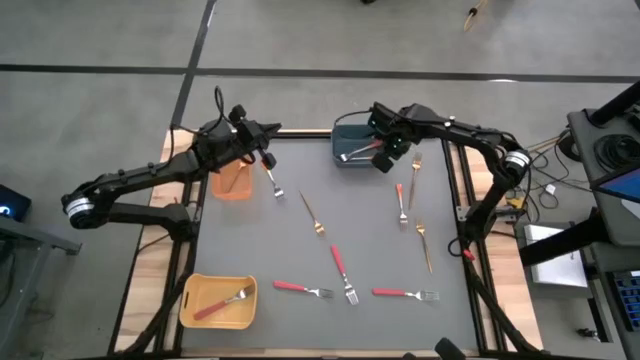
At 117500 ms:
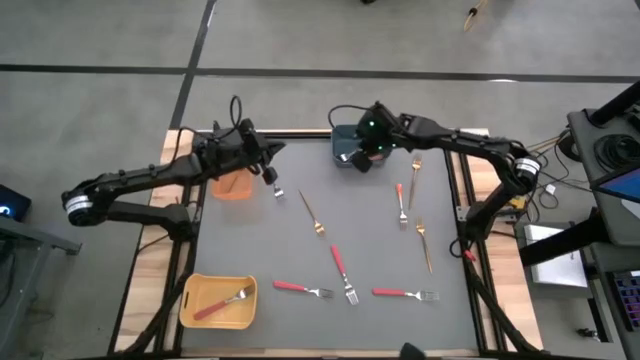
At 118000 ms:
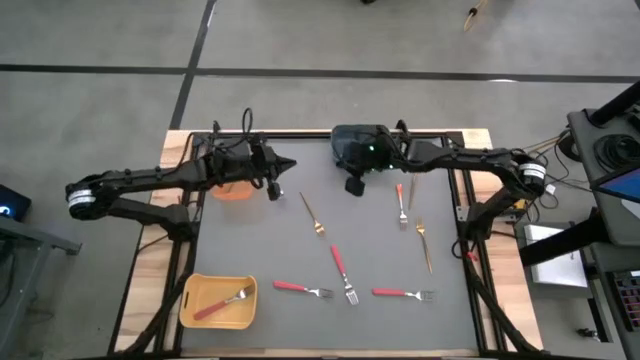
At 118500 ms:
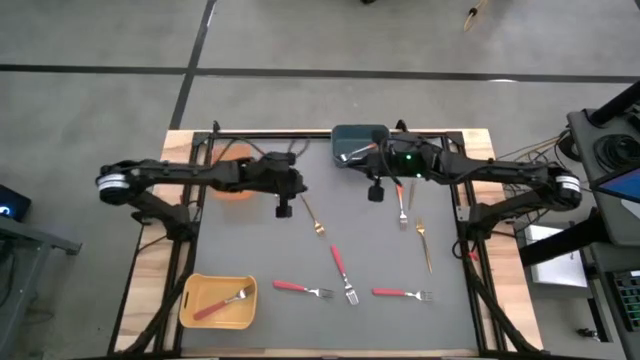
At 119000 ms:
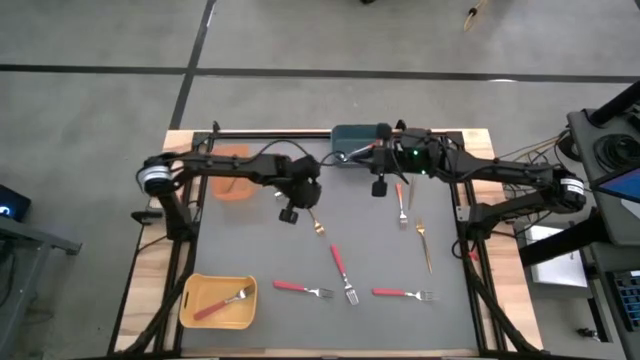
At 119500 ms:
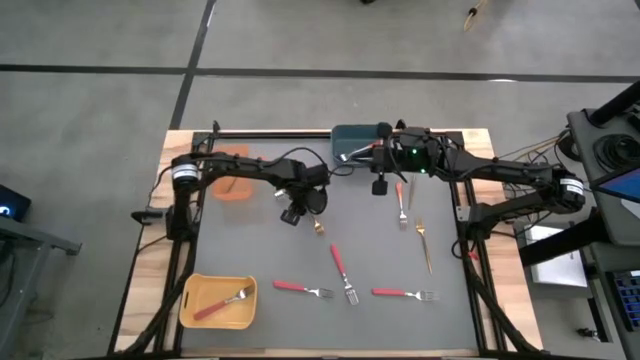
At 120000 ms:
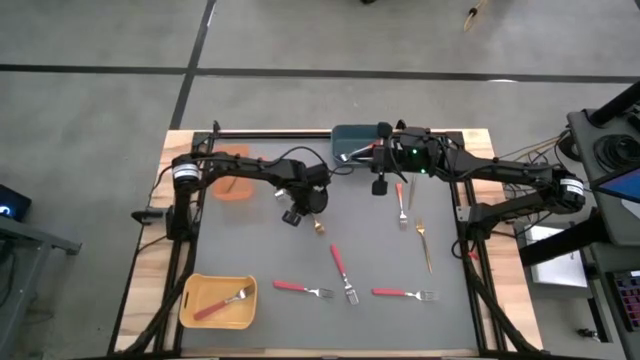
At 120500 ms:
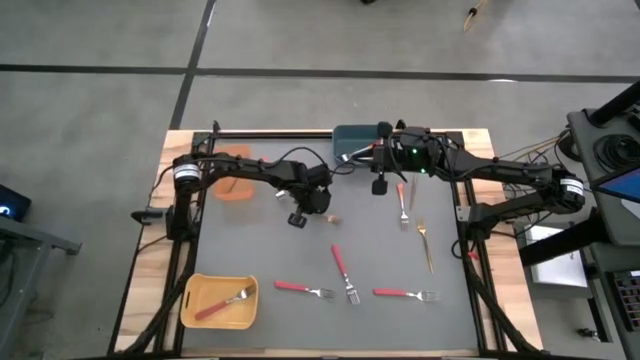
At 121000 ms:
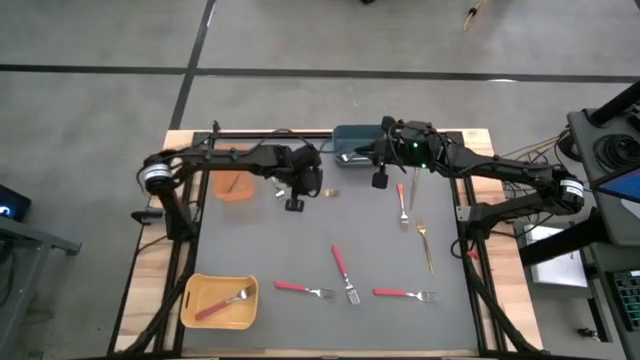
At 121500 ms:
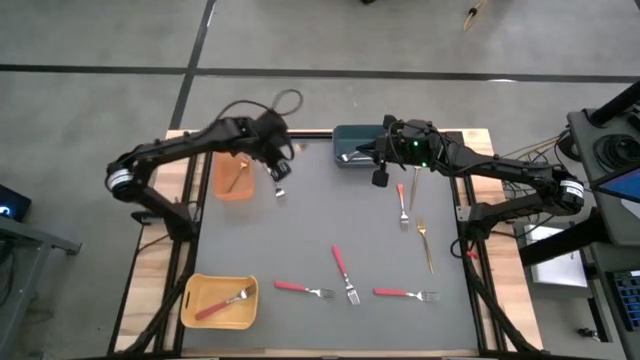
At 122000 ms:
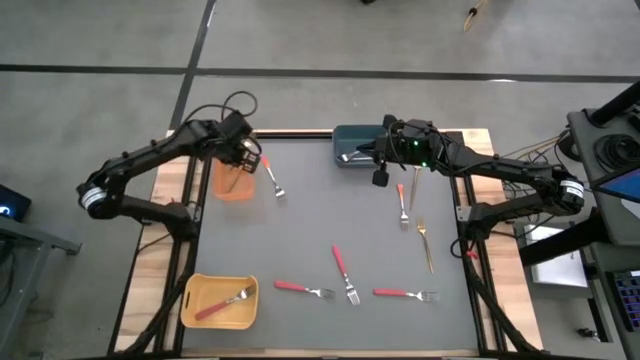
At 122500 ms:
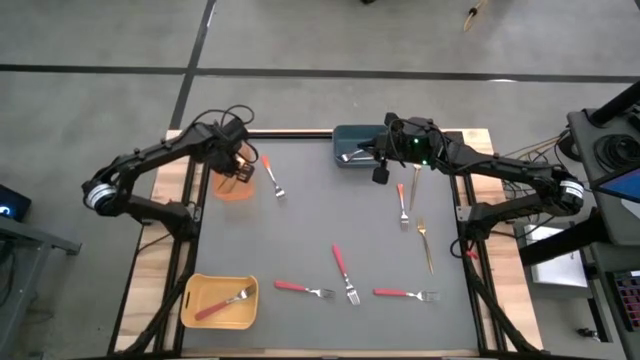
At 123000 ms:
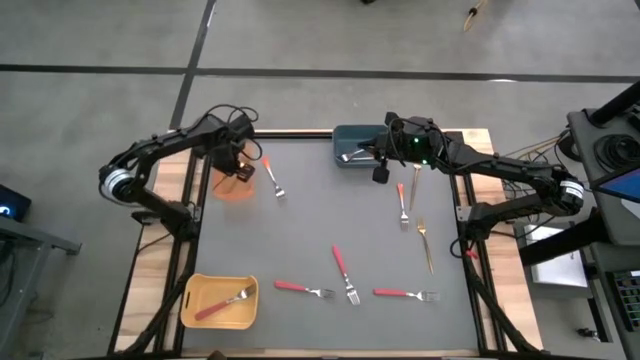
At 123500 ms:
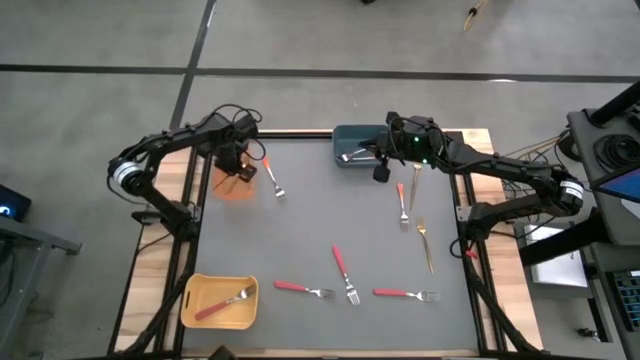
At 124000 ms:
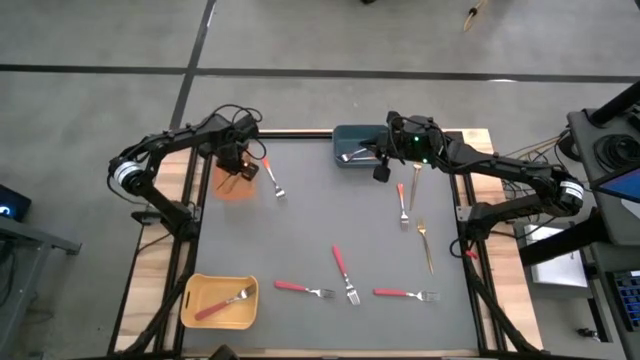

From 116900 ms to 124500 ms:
Task: Sort silverware by color (type)
Put the gold fork into the orange bin

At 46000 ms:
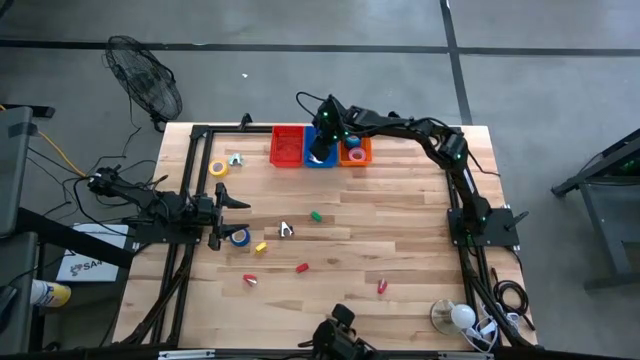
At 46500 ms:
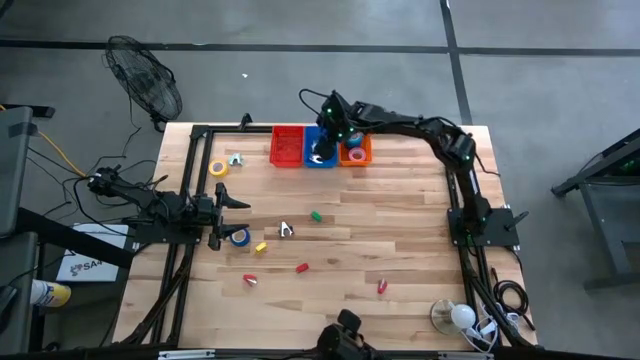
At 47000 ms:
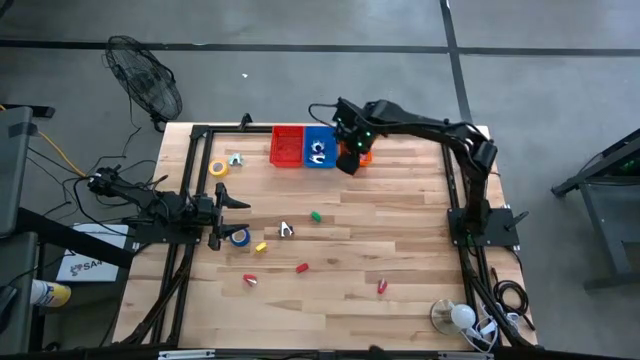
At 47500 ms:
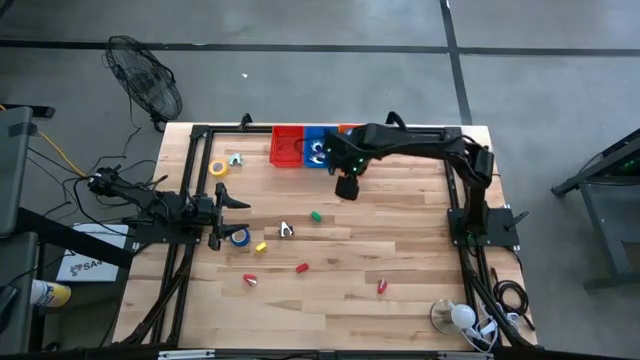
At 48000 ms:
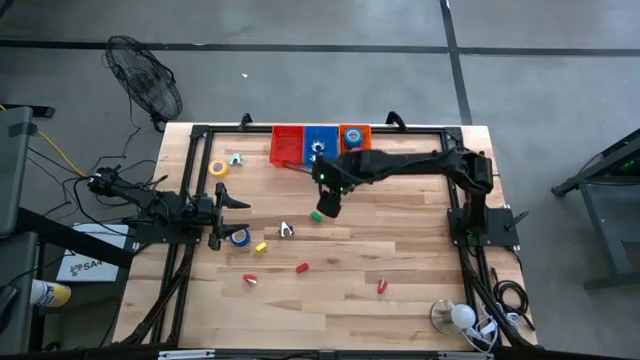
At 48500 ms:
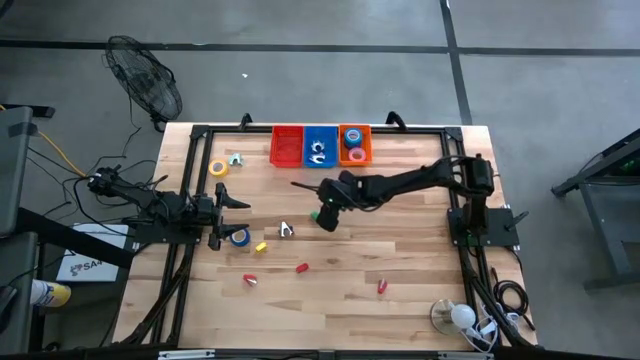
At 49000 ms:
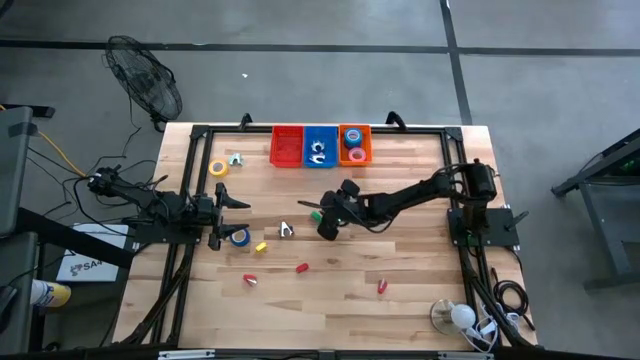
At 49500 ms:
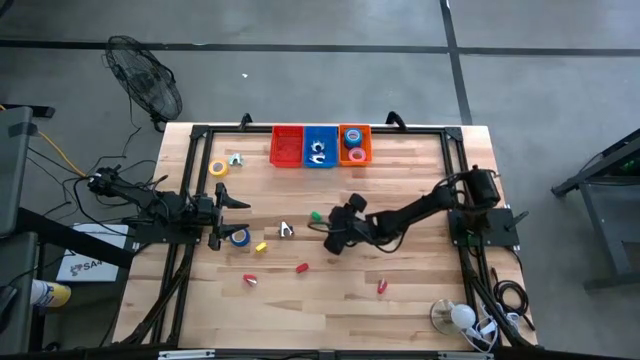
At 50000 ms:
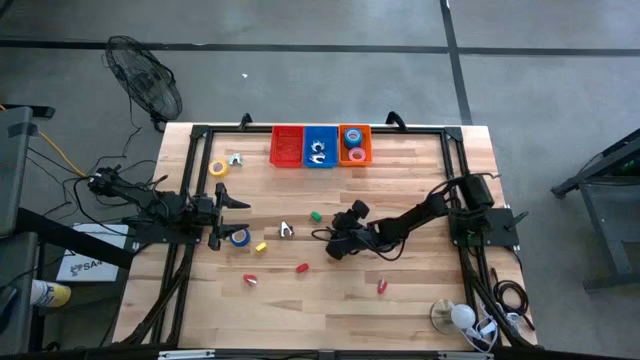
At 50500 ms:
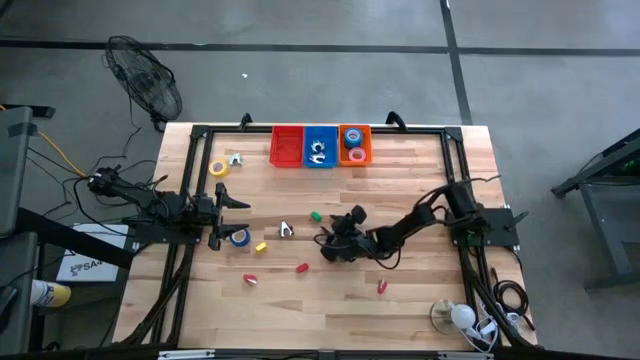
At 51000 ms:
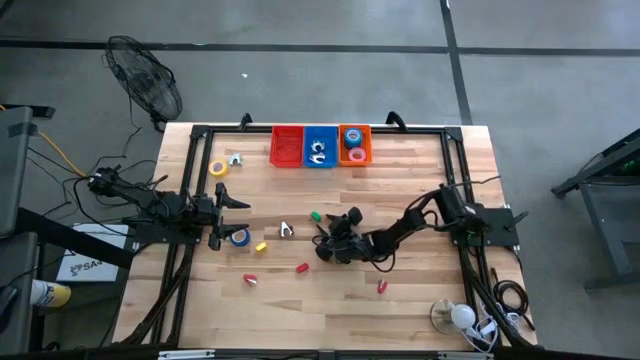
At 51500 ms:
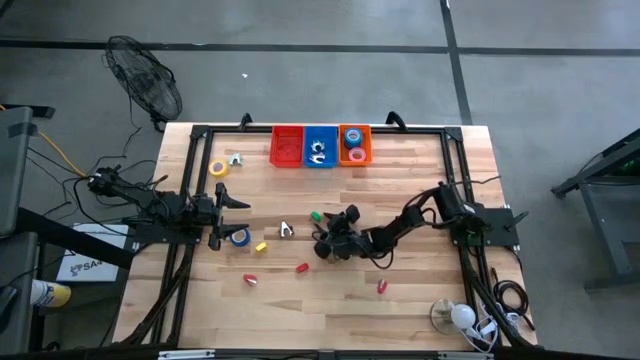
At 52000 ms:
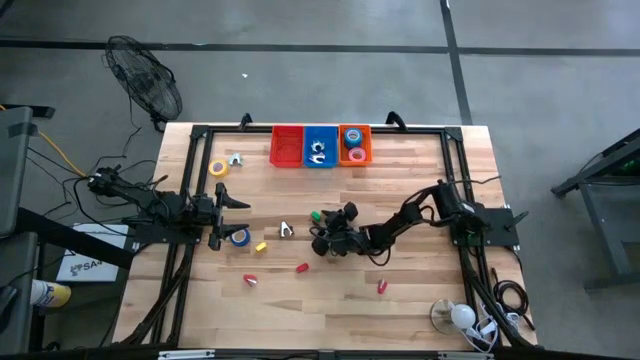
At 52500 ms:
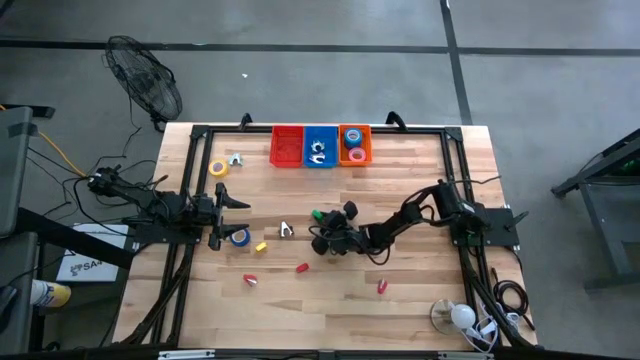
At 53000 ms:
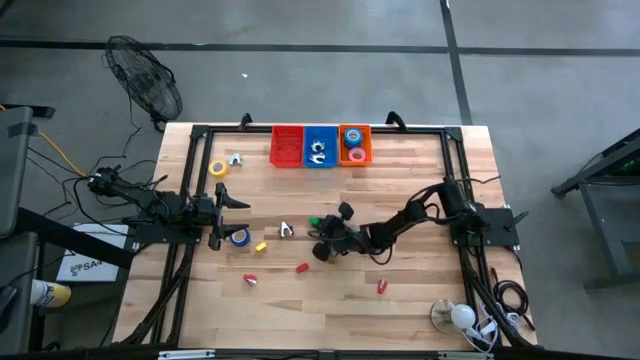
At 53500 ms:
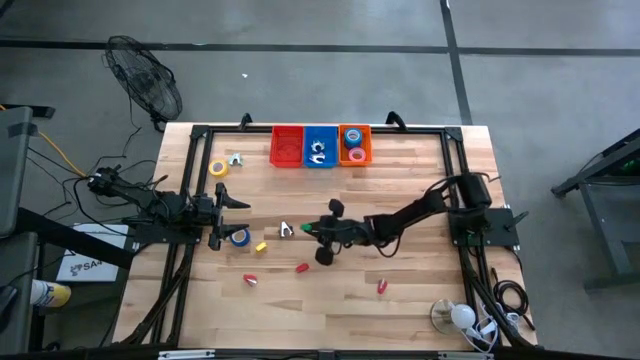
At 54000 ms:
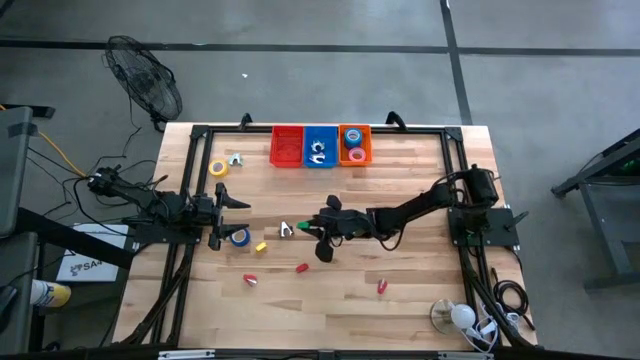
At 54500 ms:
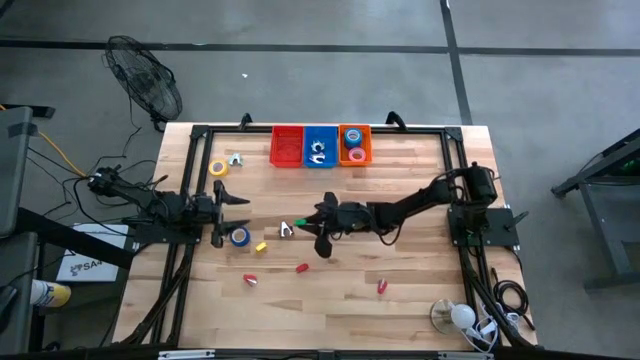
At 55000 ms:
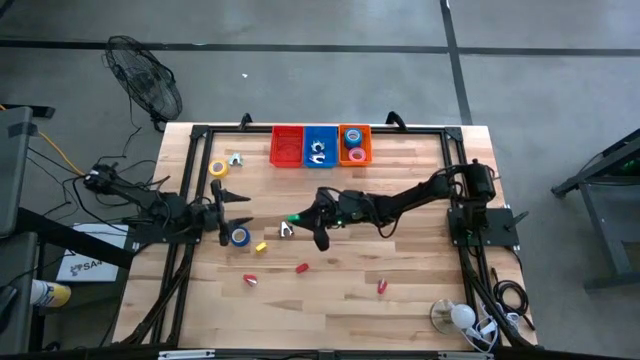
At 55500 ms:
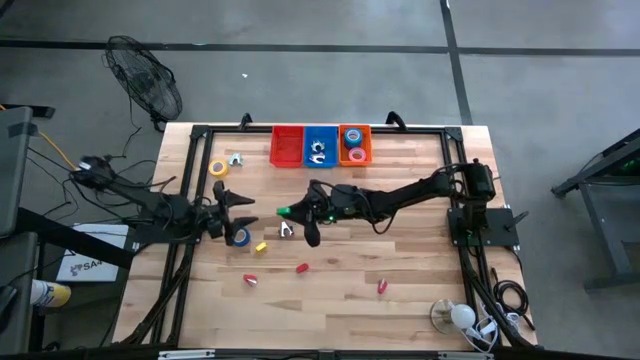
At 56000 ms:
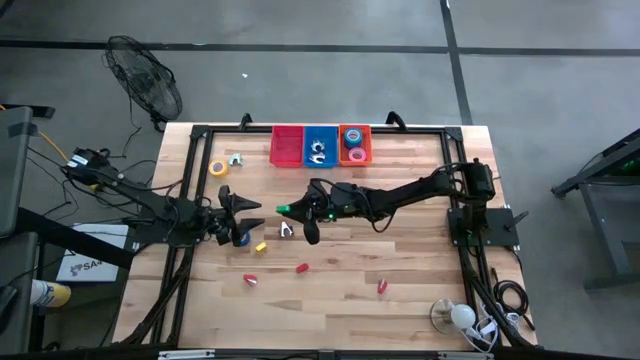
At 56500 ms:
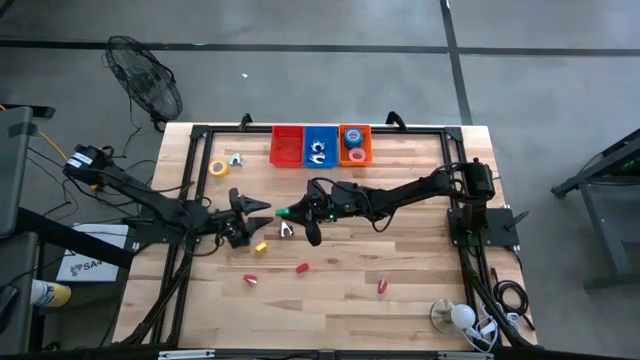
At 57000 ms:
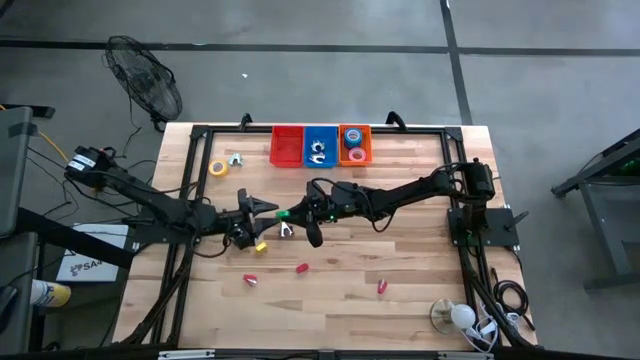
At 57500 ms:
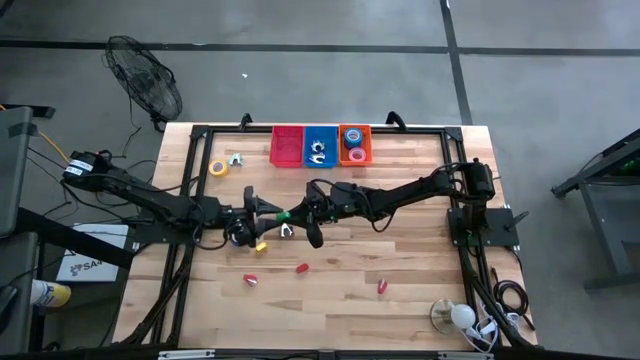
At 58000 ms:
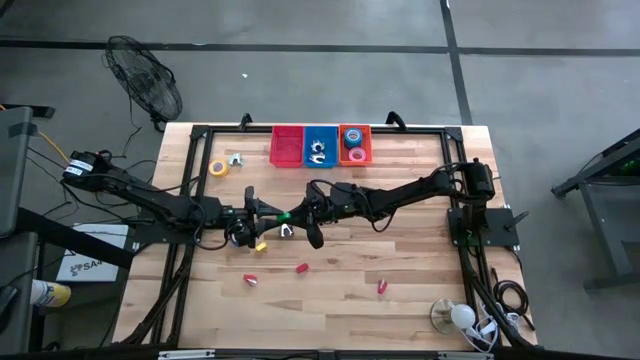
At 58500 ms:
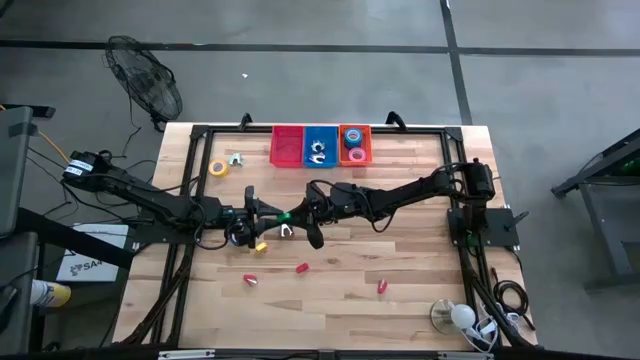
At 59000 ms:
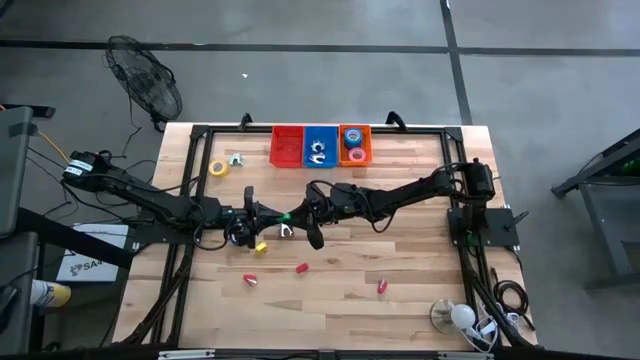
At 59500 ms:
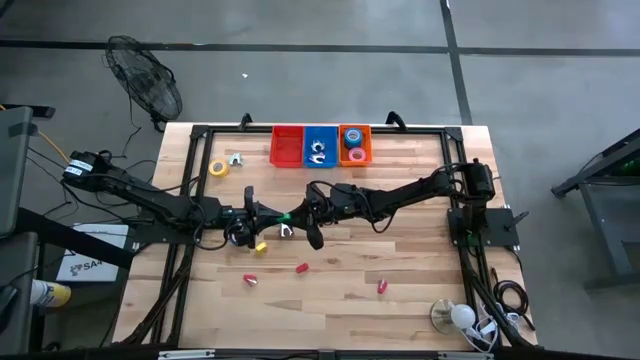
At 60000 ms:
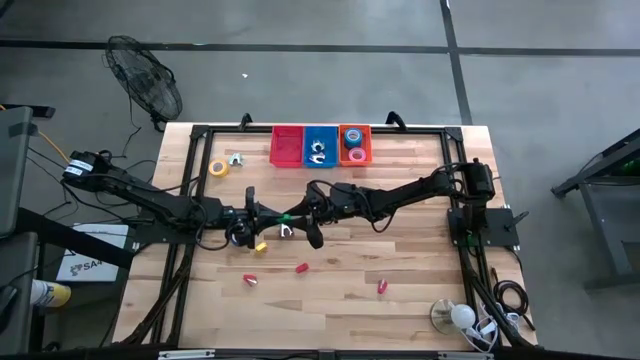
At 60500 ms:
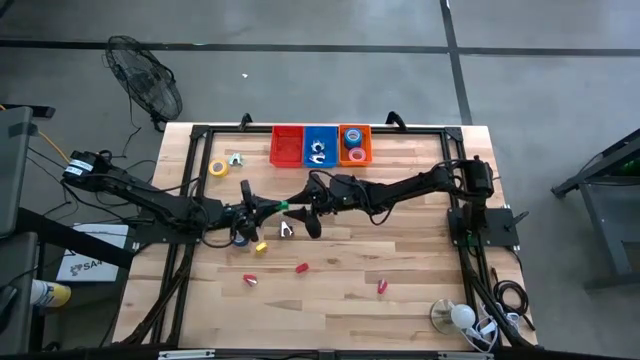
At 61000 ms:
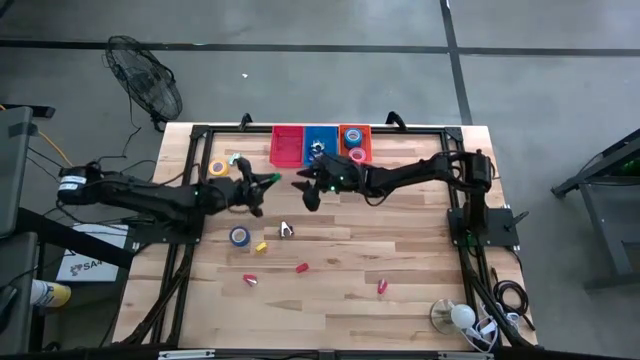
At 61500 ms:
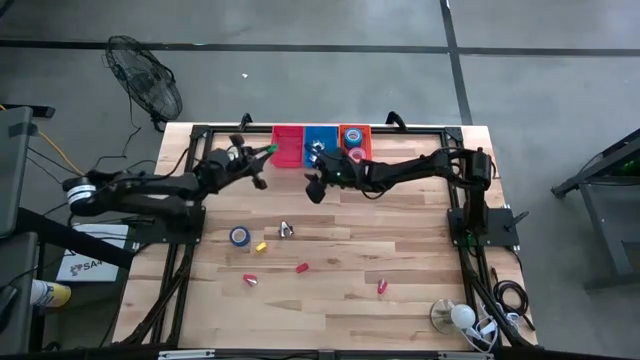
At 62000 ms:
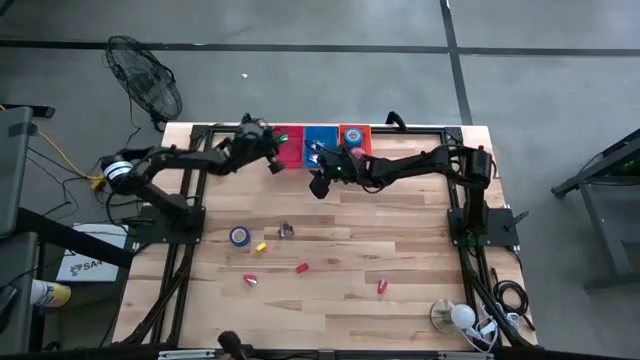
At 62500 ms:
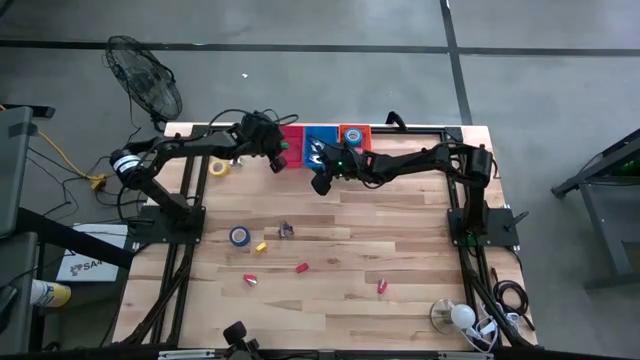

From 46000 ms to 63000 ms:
Task: Pick and place Stapler, Stapler remover, tape
Put the green stapler into the red bin
